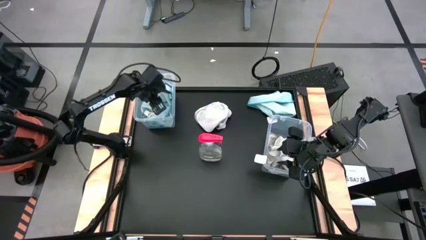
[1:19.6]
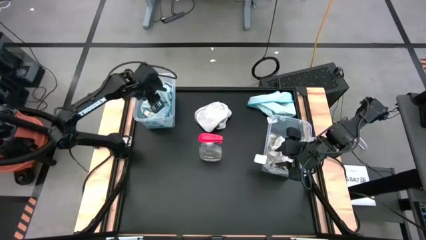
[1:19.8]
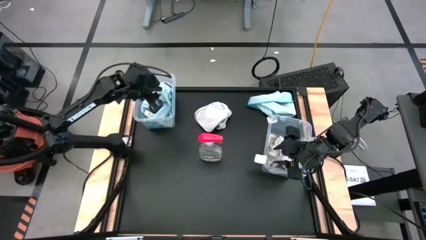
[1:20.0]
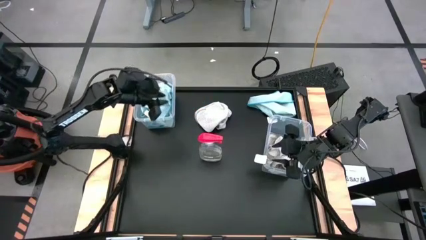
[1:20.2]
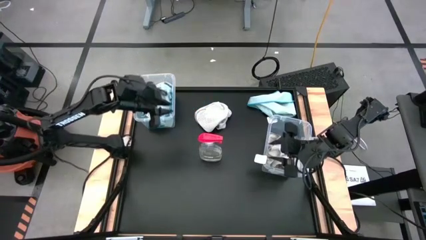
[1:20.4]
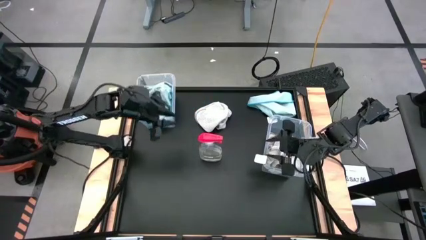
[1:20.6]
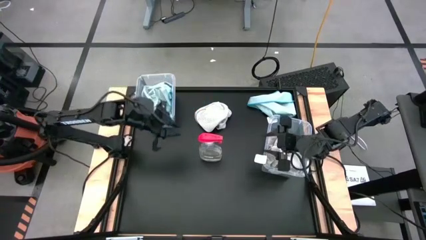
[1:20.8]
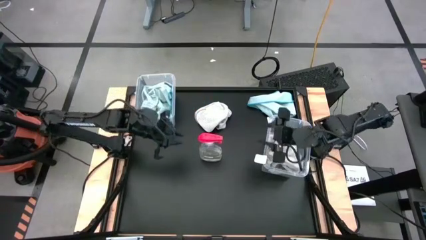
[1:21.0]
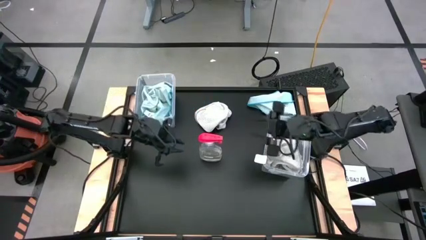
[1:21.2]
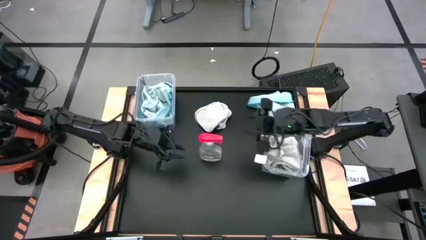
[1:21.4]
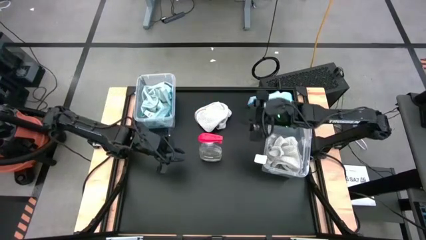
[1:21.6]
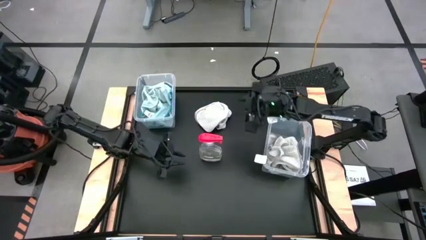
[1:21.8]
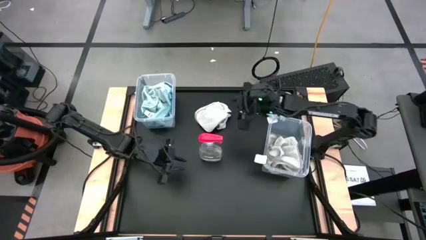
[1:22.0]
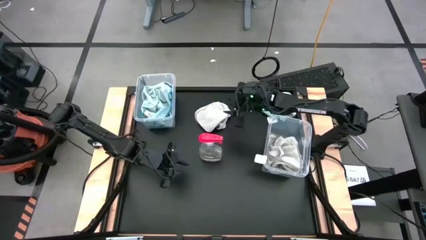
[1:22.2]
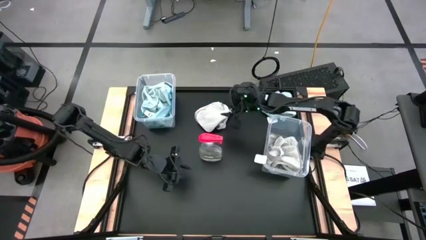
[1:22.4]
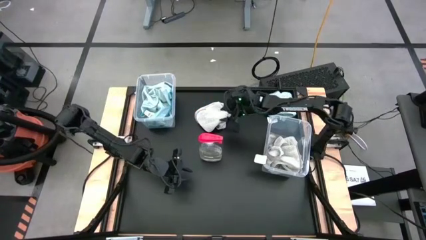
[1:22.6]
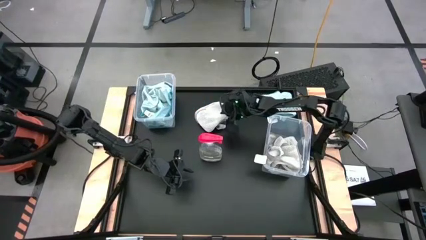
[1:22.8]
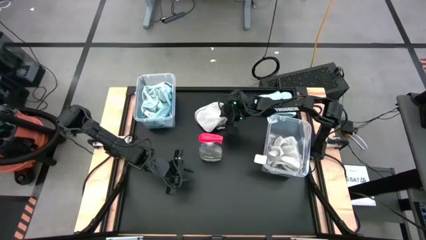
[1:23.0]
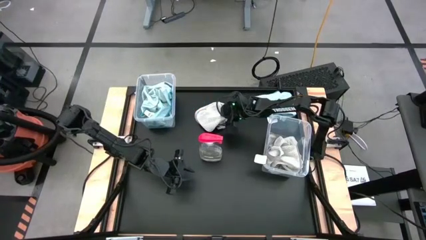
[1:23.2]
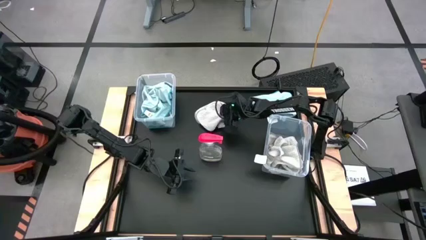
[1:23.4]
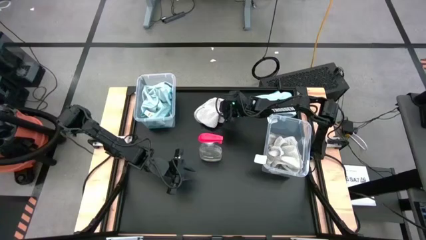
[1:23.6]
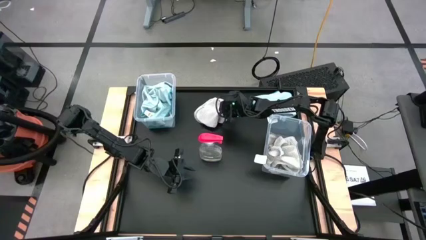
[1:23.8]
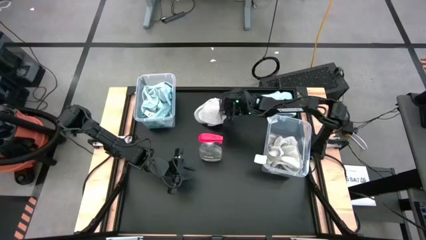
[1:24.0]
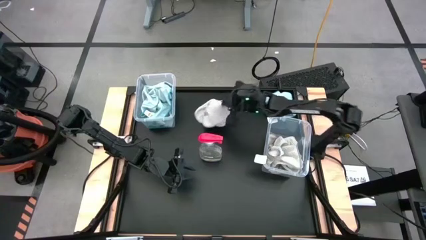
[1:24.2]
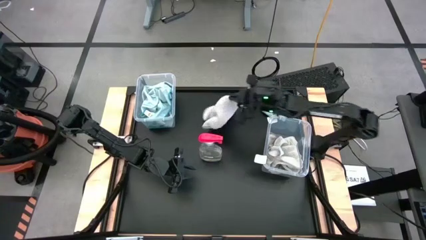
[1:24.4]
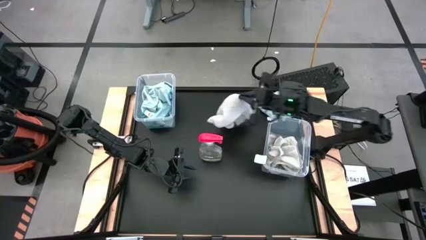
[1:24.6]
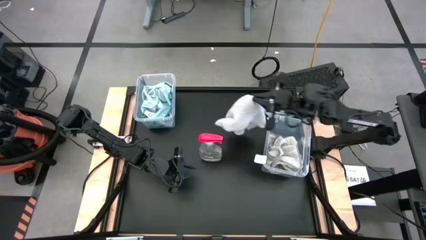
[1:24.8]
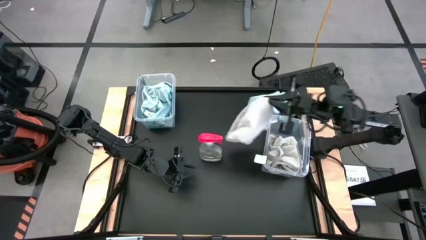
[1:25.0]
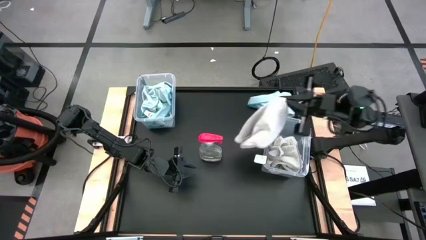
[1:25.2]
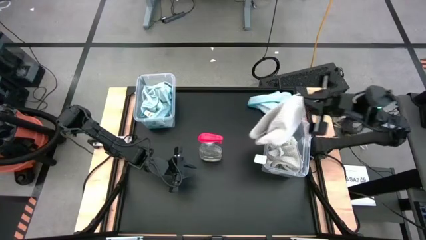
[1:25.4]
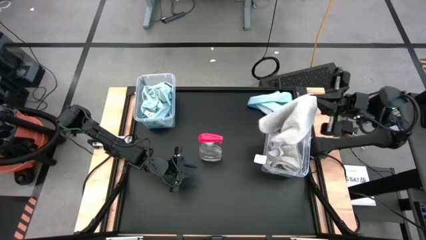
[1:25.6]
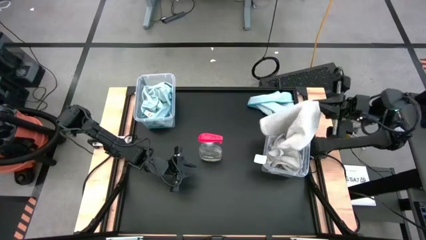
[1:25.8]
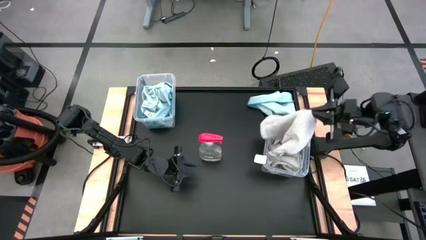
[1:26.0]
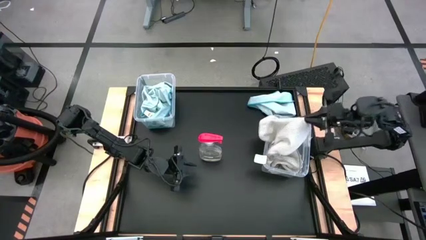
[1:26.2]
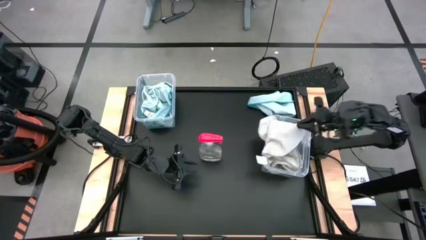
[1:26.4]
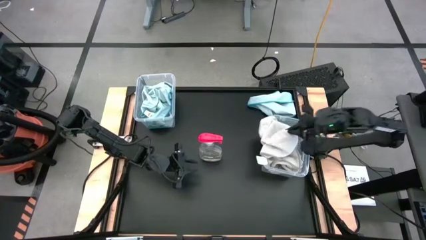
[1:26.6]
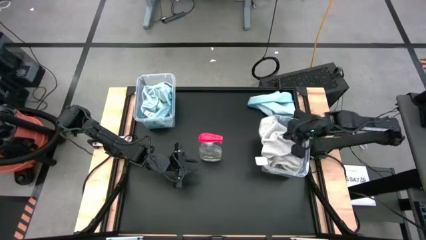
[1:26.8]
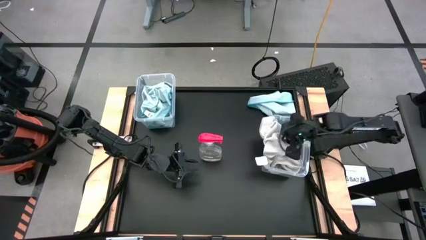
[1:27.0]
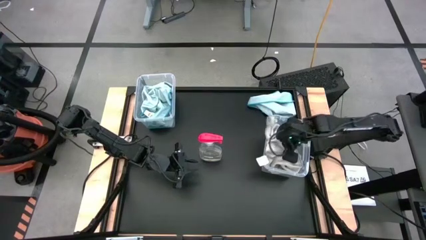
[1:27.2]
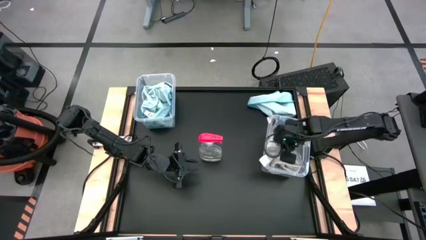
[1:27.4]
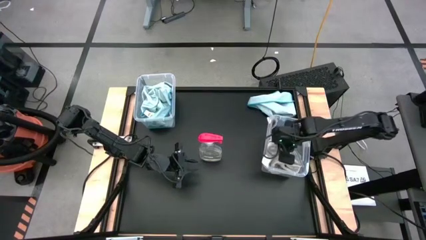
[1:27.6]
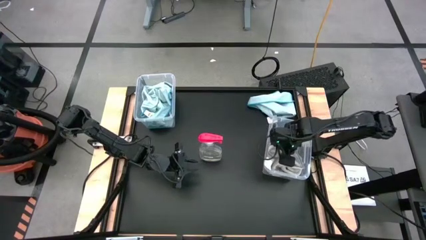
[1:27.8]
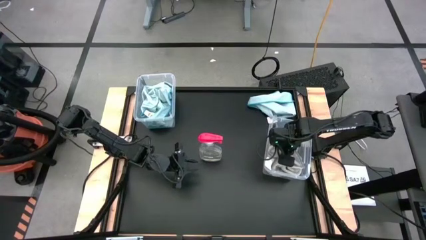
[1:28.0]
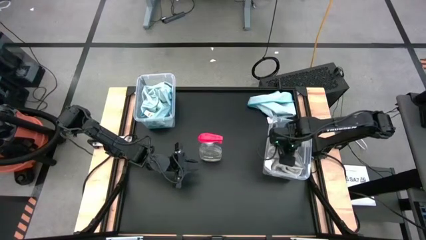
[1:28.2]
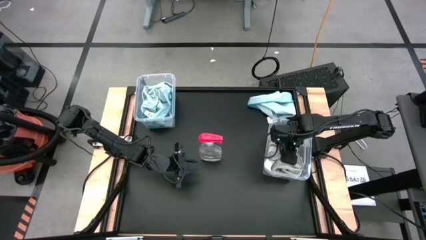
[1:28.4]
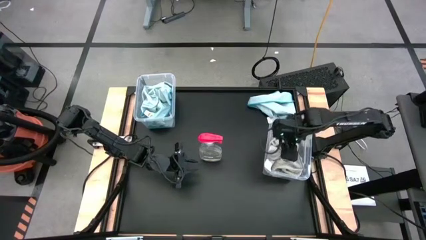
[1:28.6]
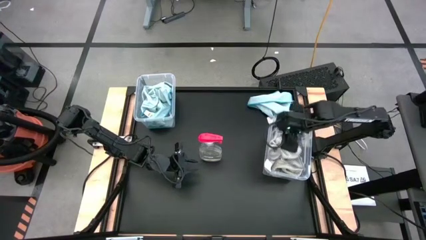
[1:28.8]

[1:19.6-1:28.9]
Task: Sort microfiber towel by color & place in baskets
Put the gray towel into the right transparent bin

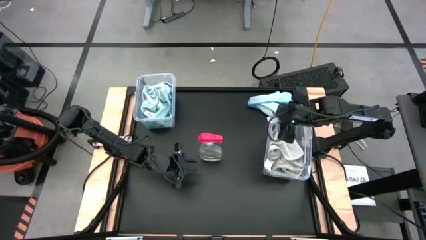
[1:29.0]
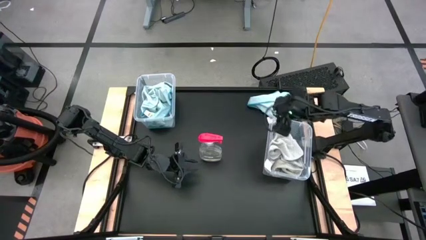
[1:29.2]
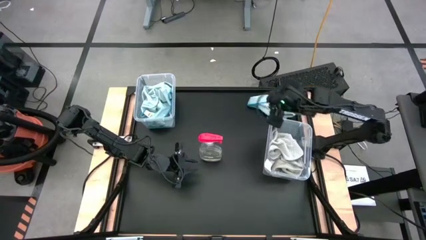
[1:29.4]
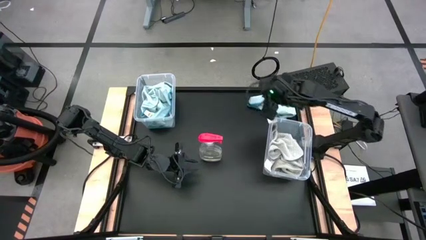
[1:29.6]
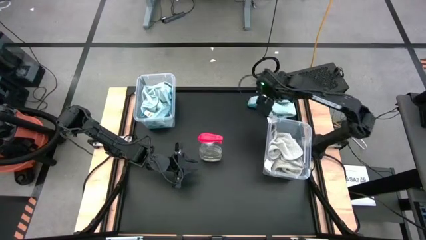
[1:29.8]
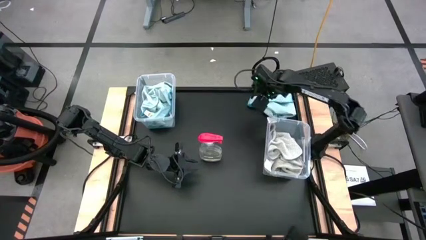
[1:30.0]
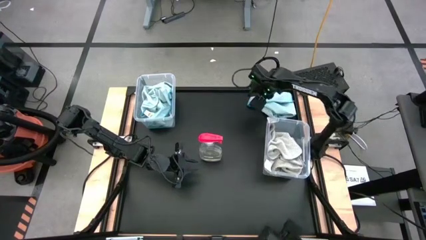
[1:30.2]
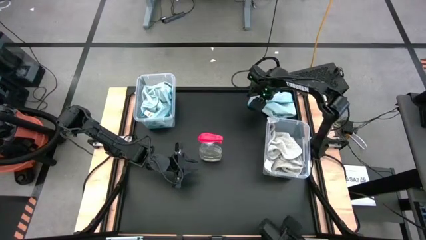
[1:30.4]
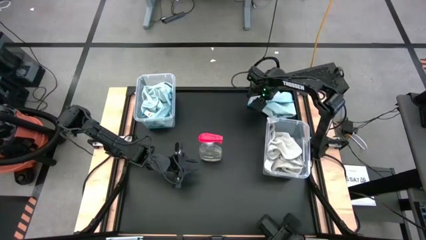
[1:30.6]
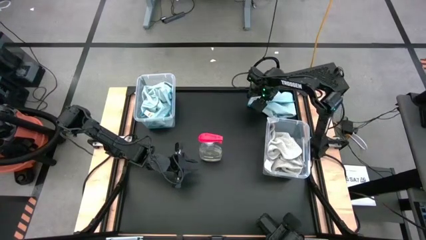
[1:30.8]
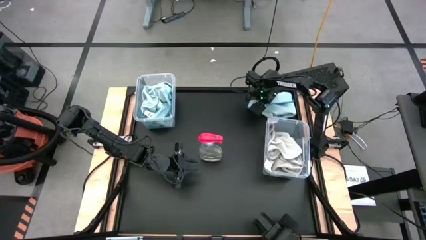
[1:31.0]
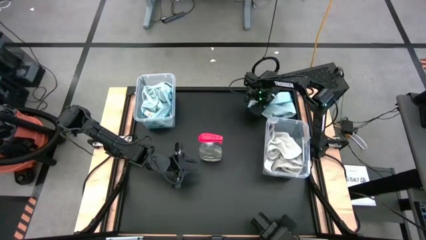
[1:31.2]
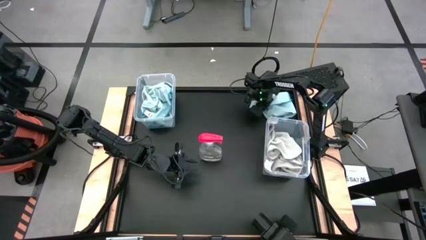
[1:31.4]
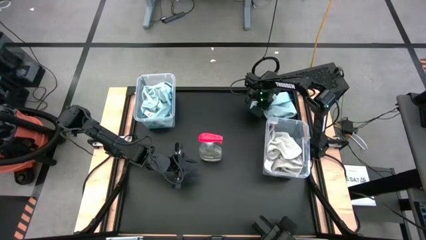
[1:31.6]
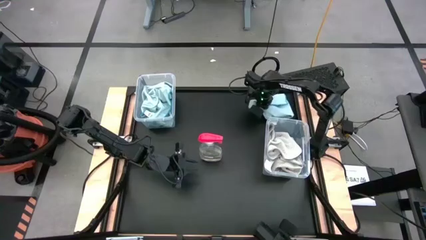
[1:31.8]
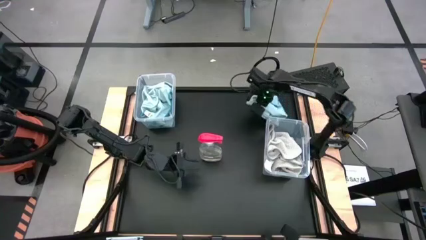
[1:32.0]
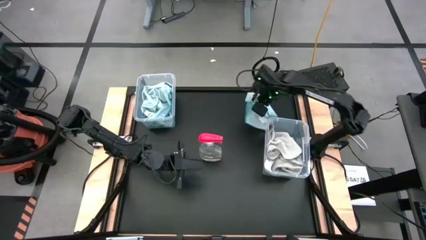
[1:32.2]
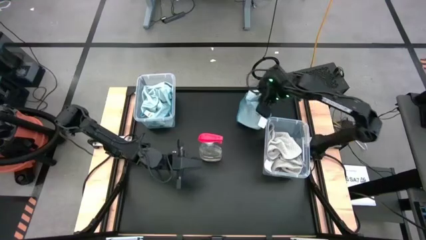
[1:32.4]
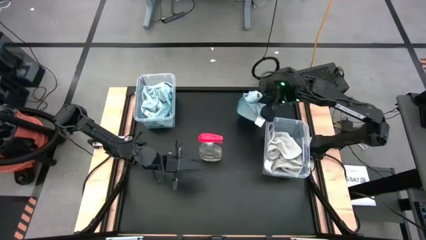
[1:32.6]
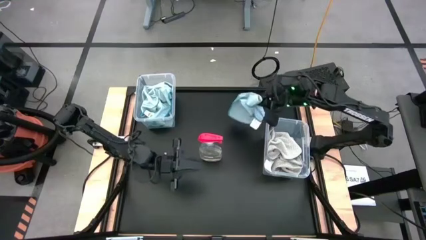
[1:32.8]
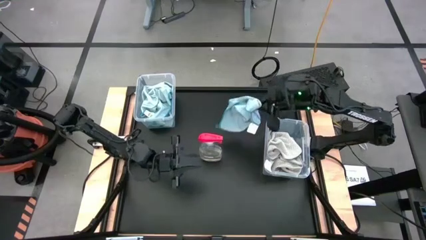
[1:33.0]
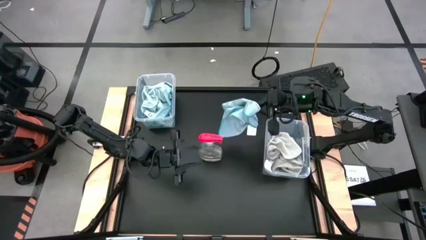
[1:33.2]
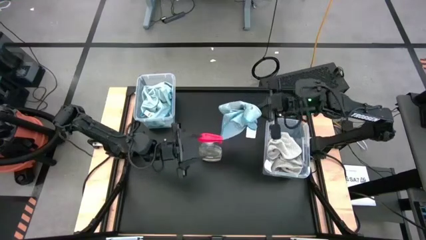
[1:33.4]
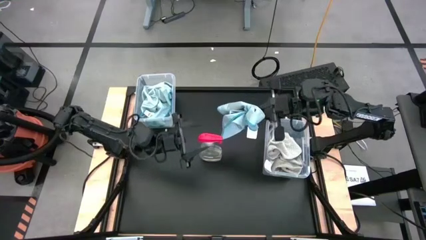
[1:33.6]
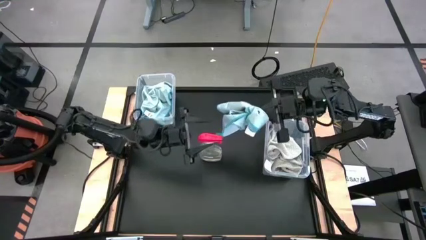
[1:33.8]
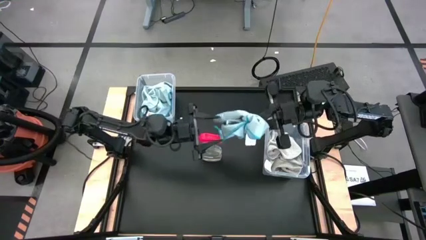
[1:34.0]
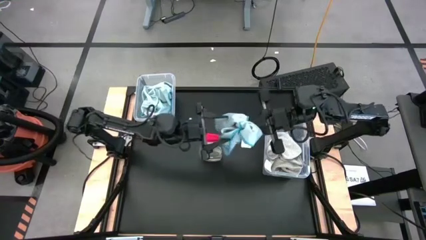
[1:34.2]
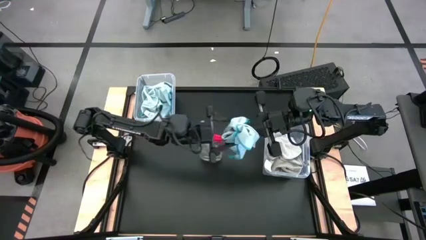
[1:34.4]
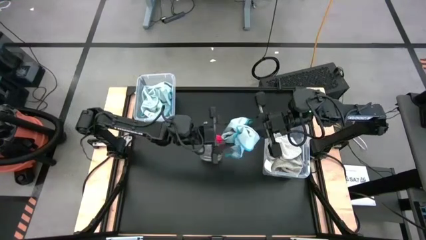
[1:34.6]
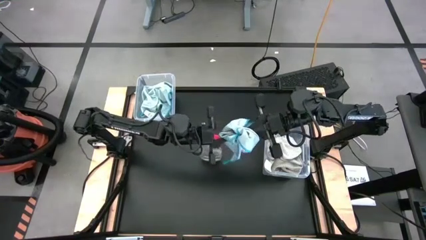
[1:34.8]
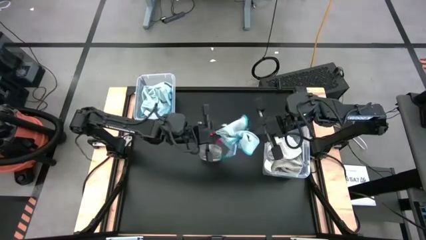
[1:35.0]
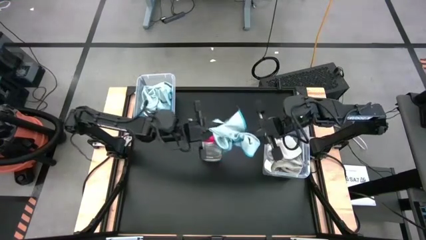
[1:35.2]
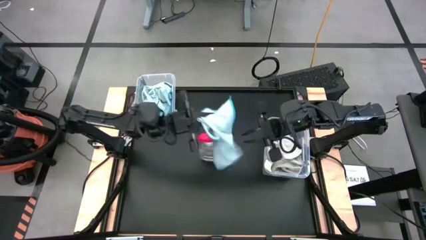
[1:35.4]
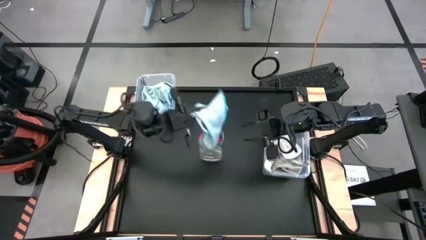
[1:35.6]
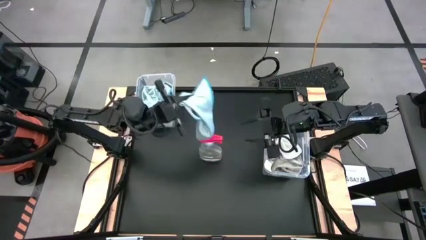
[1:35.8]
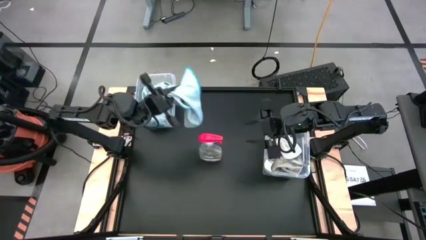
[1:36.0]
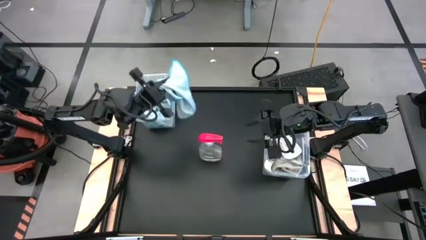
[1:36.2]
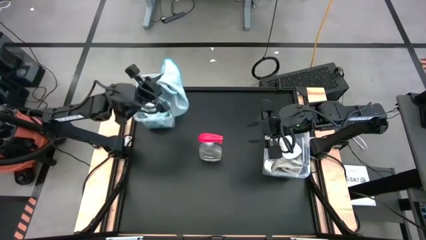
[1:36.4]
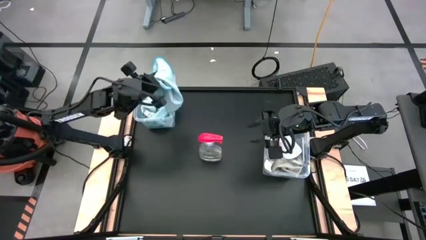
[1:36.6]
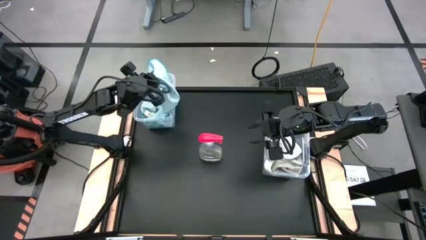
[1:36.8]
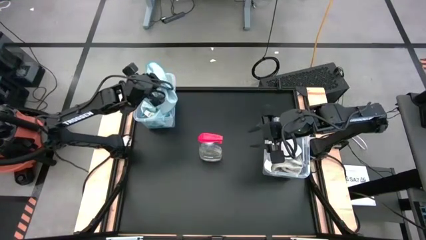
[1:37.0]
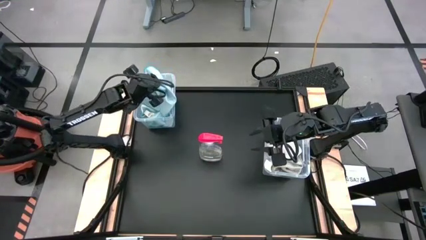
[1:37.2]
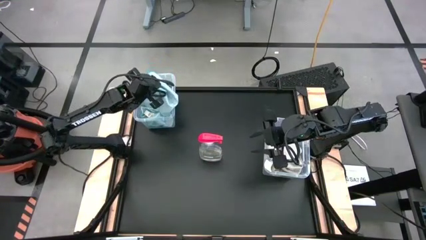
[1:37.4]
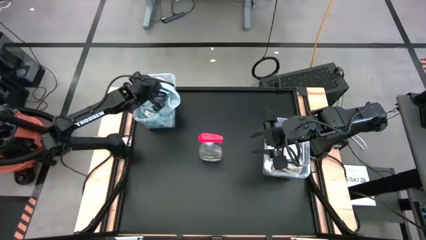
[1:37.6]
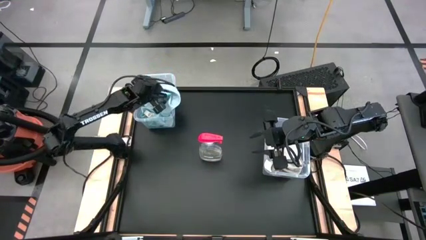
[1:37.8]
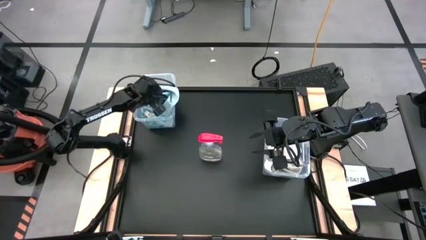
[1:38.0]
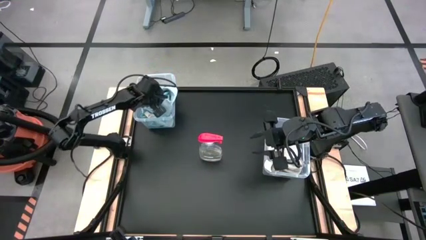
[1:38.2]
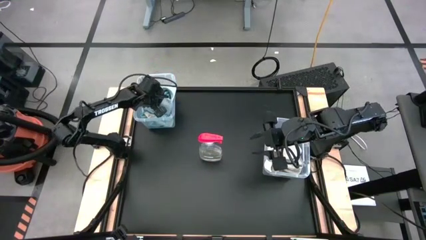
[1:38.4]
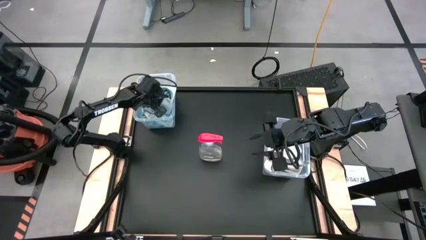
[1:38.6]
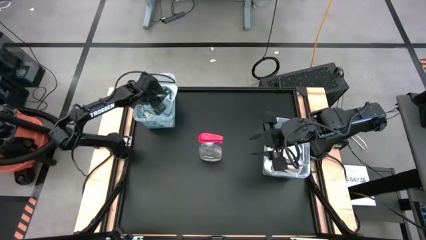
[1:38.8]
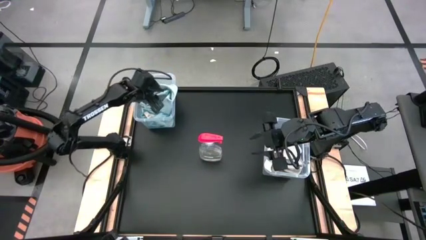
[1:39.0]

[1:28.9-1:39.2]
Put the blue towel into the left transparent bin
